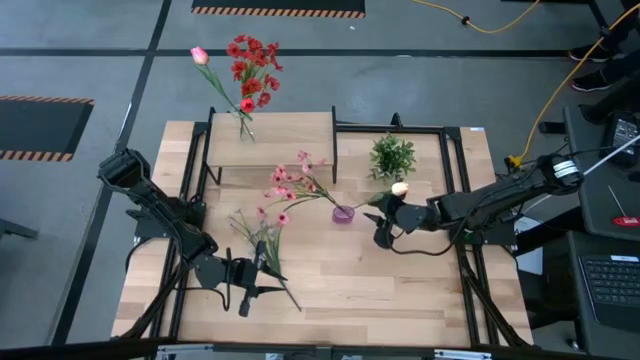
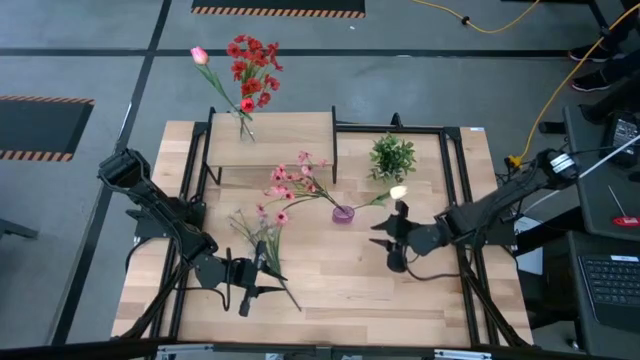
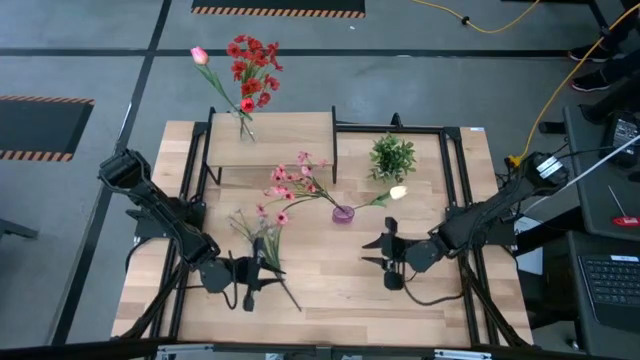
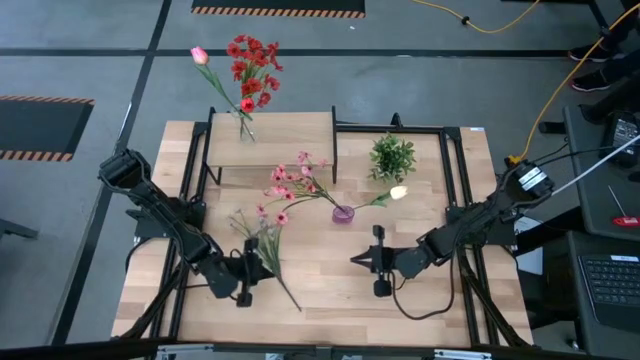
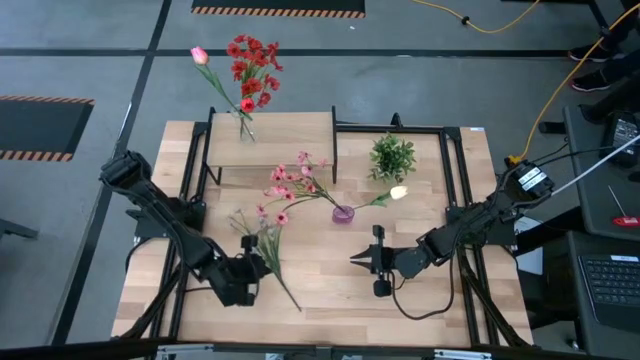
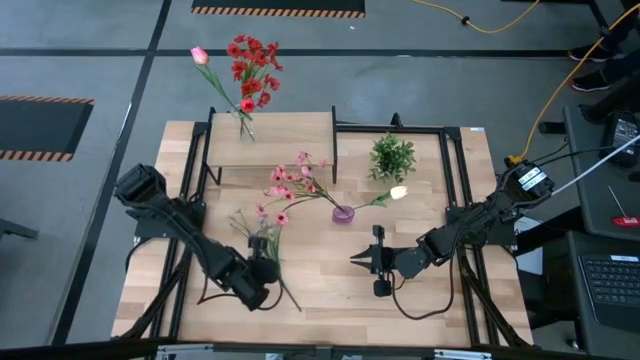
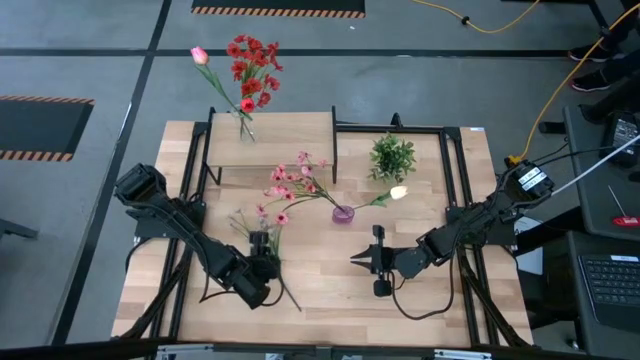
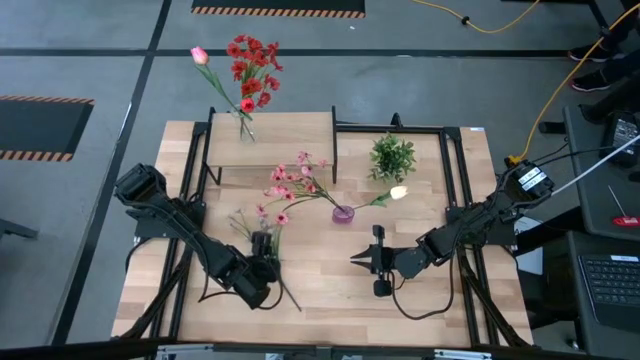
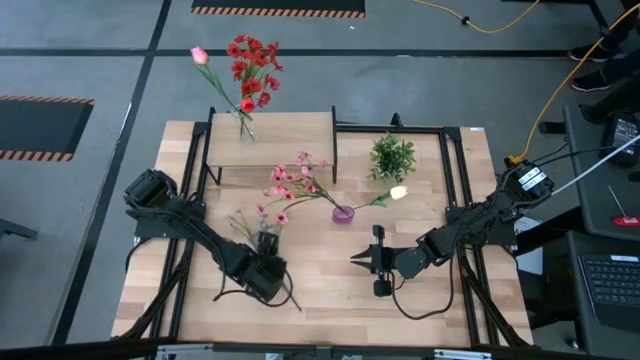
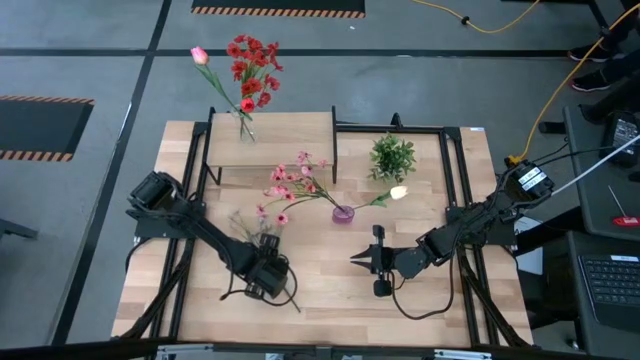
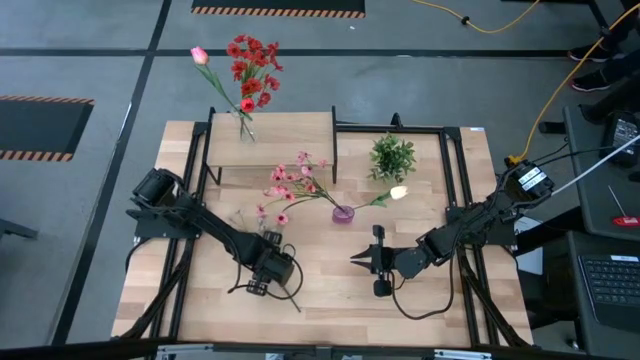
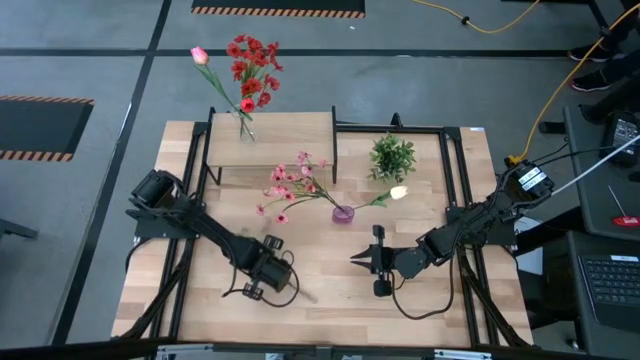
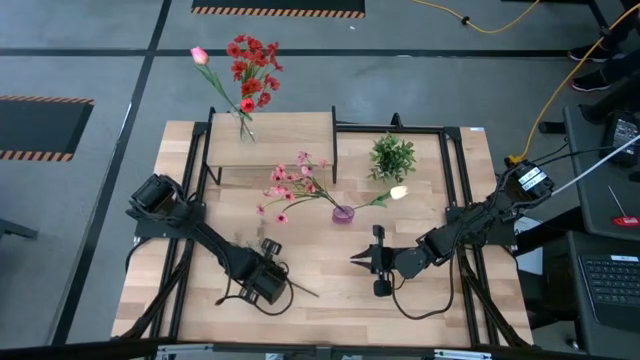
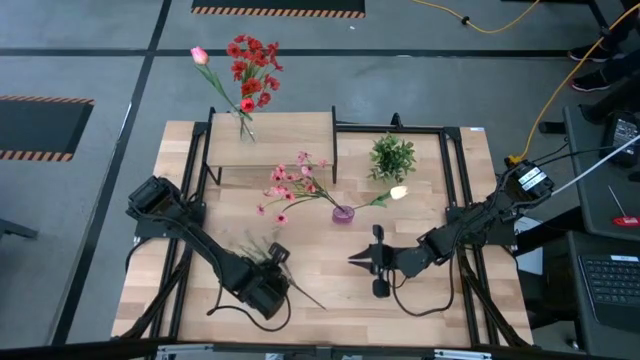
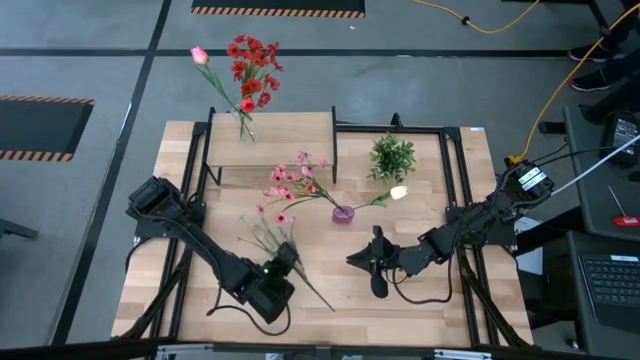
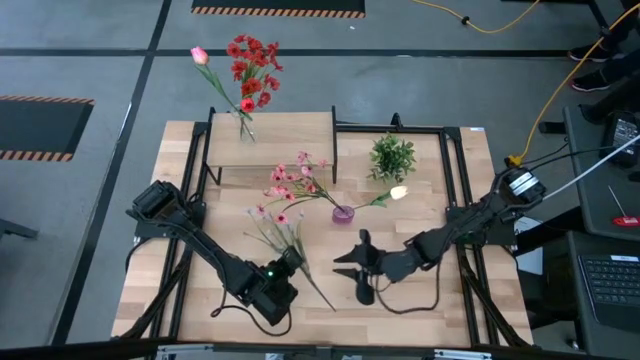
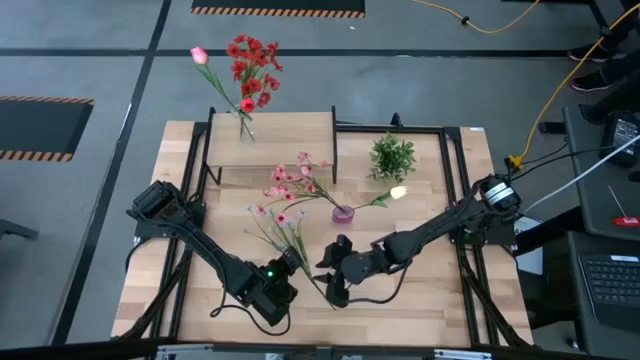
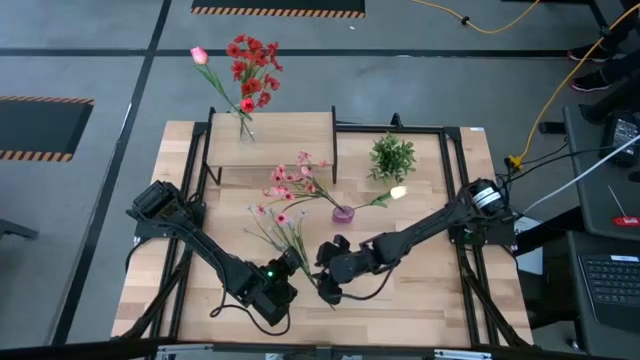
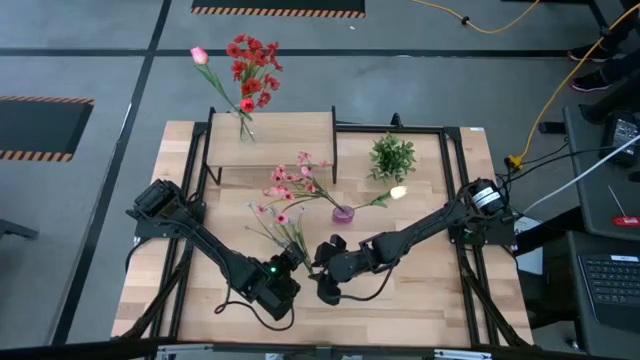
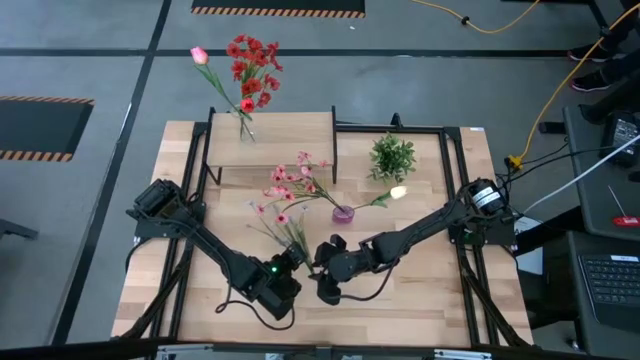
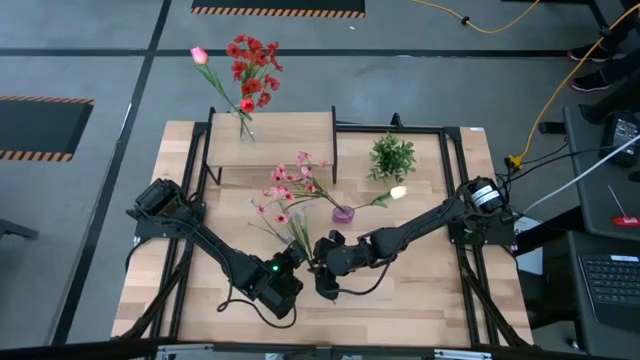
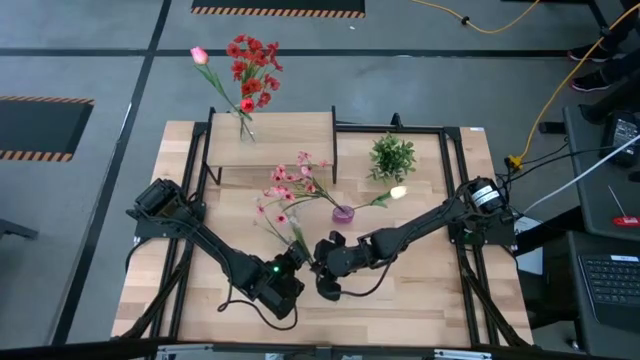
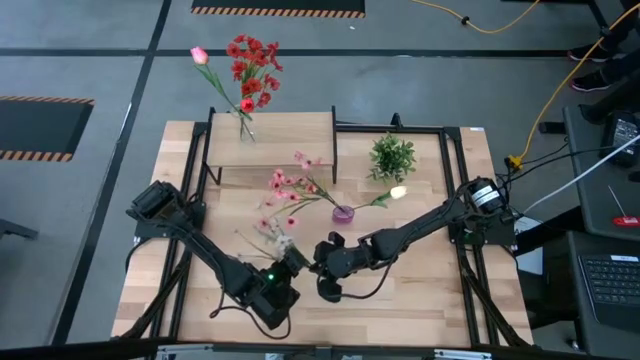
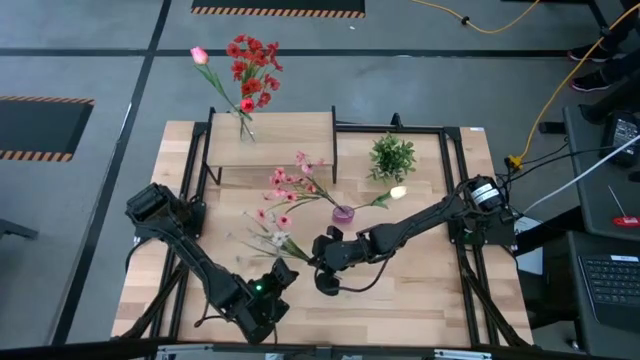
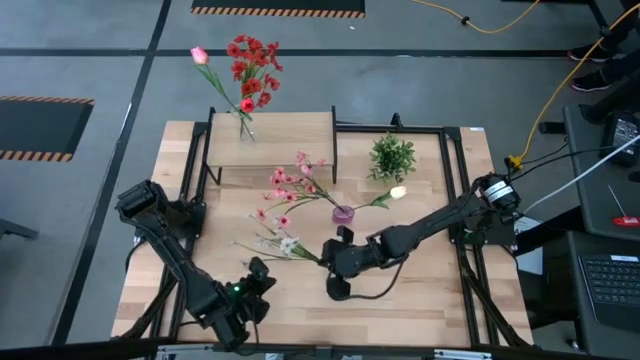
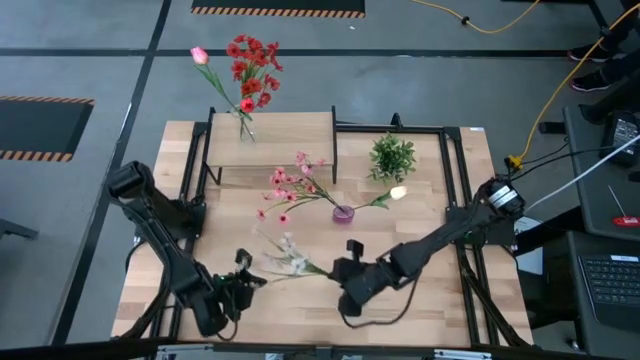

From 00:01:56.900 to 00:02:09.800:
Task: Pick and place flowers into a vace then onto a shelf
Put the white flowers into the violet vase

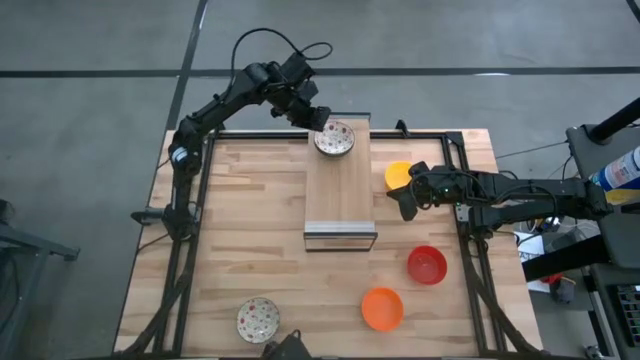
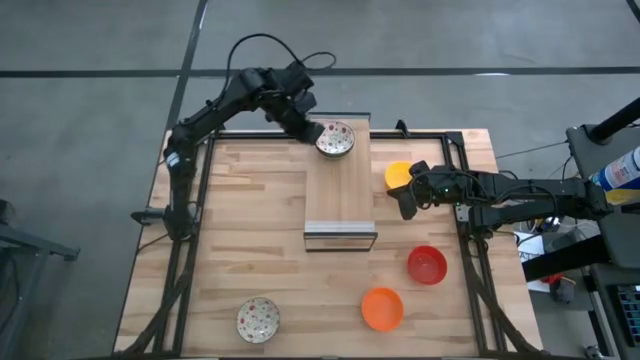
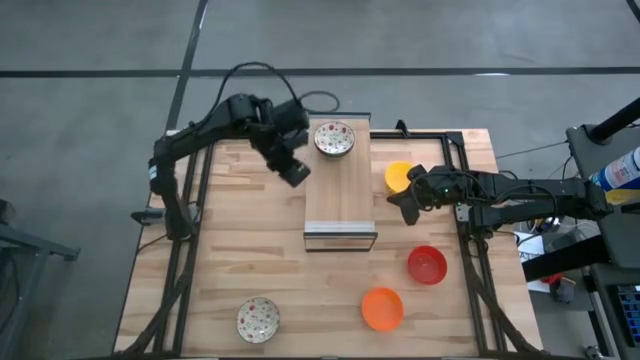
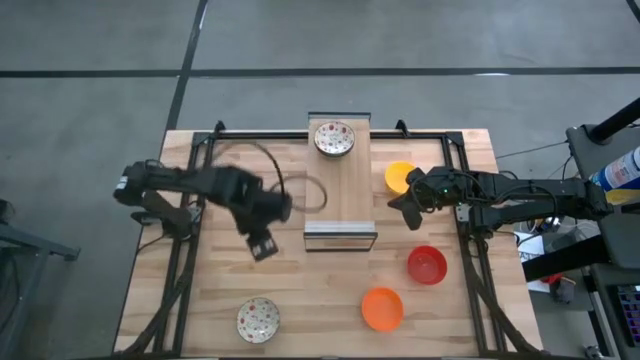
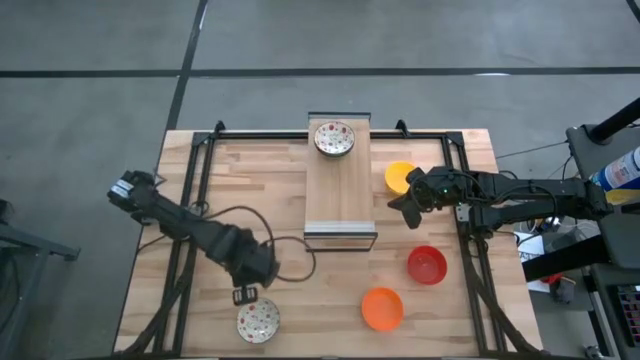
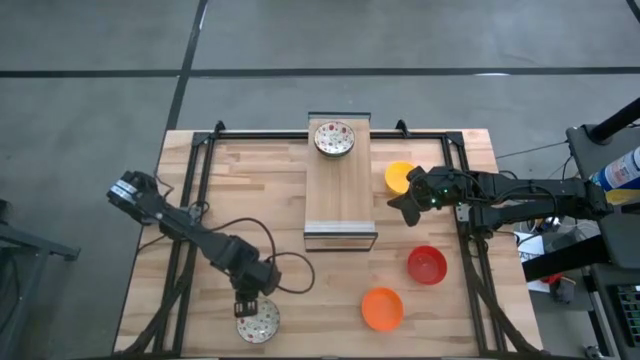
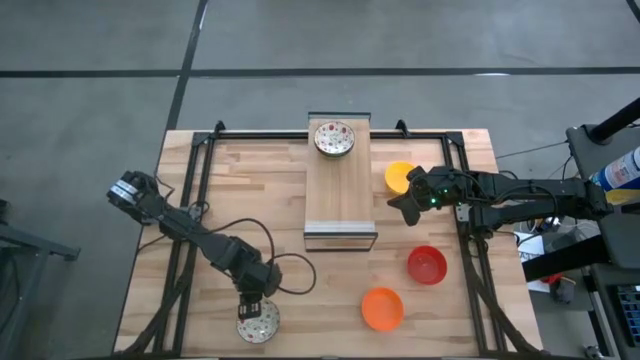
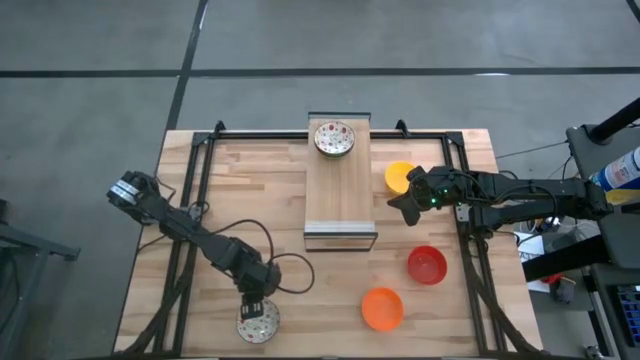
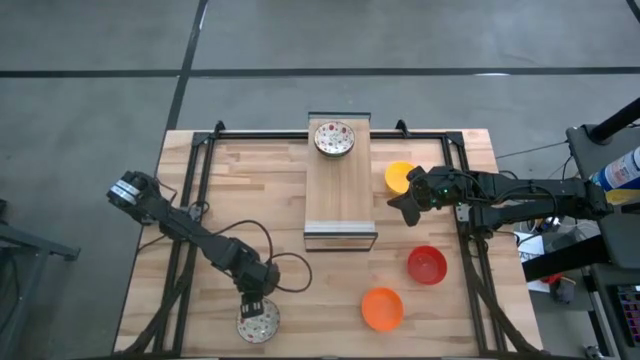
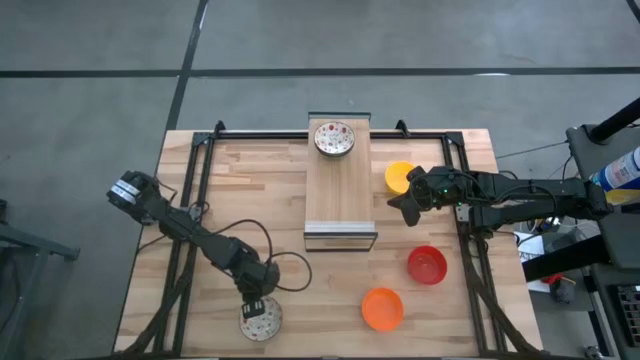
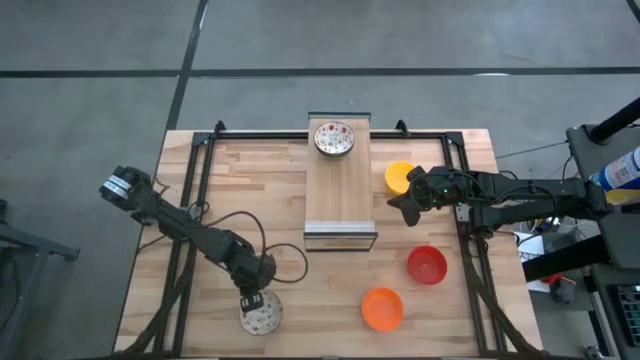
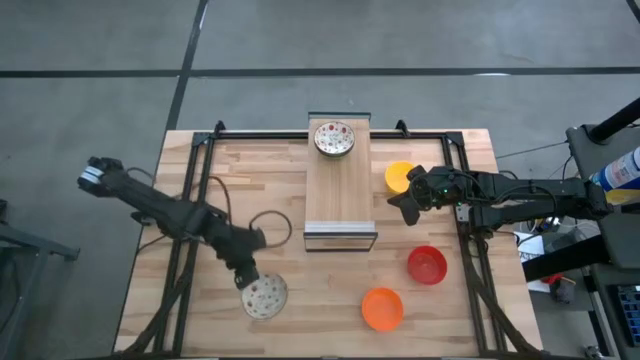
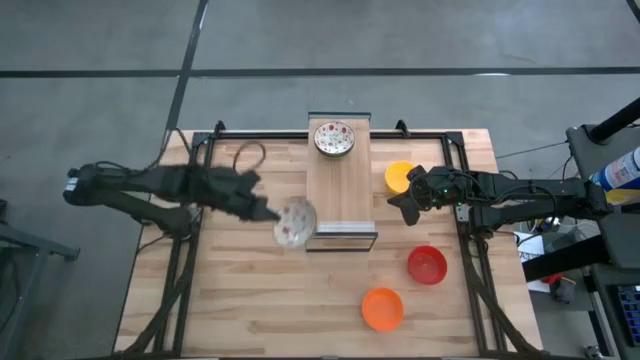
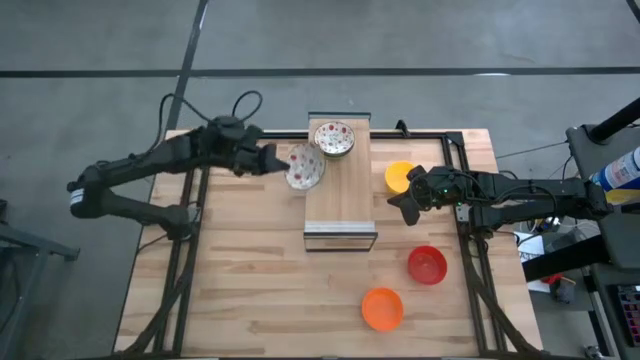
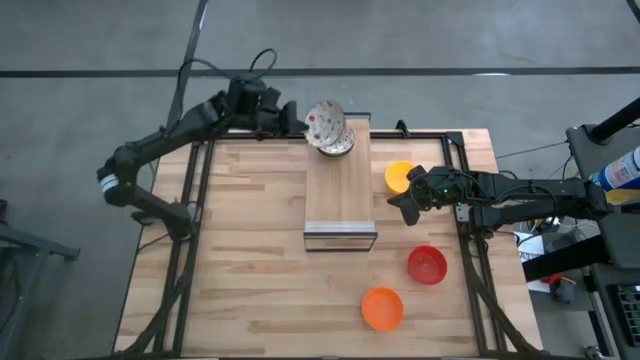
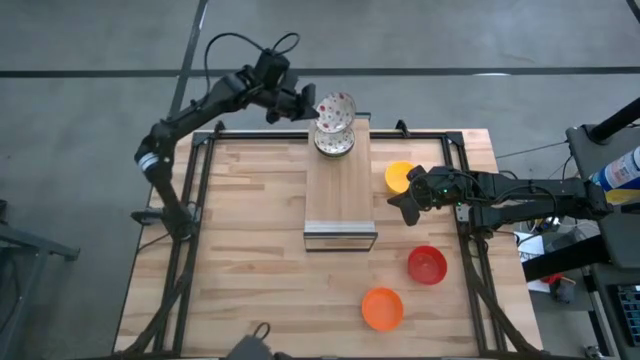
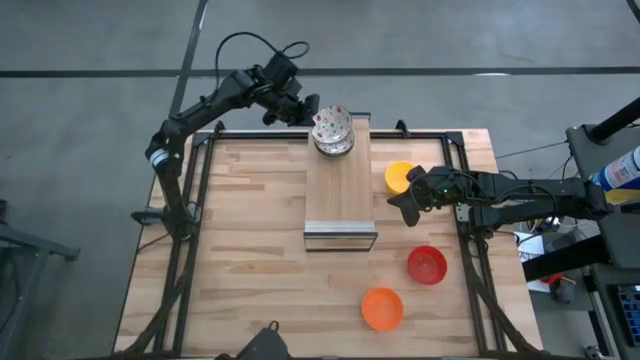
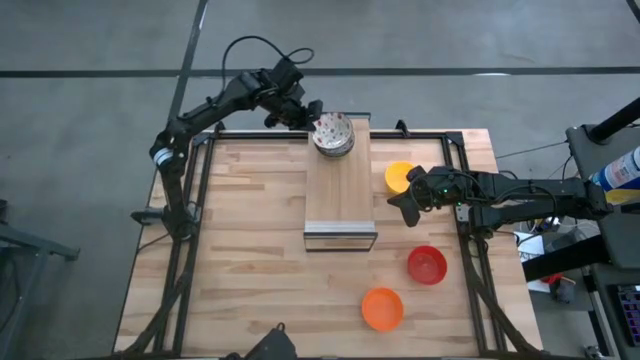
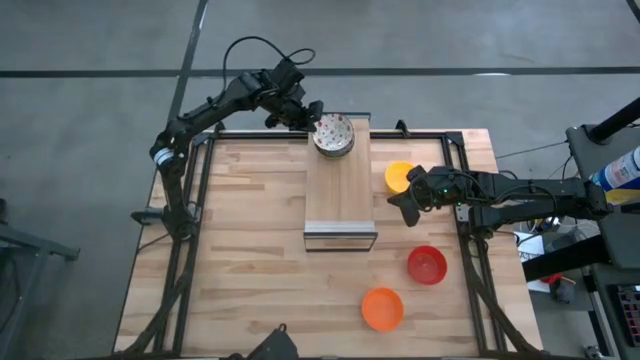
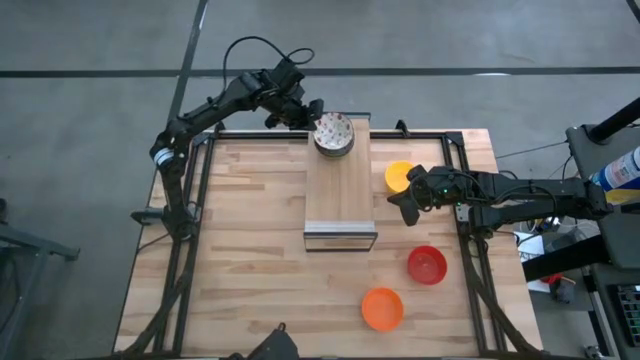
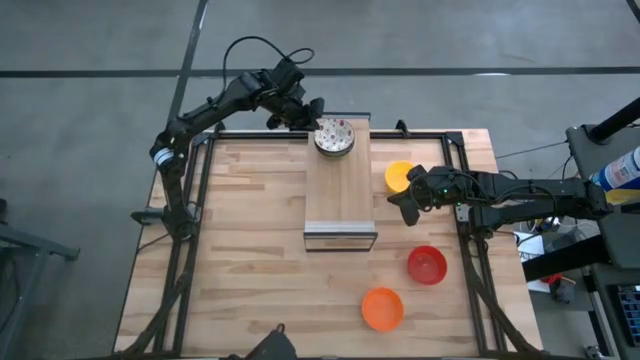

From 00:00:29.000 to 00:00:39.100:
Task: Pick & Place Mini bowls
Stack the white patterned bowl on top of the white patterned bowl on the shelf
